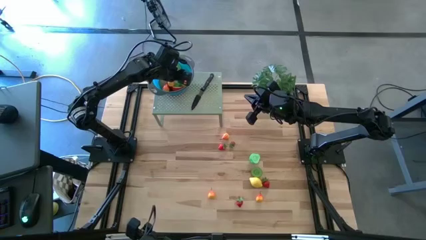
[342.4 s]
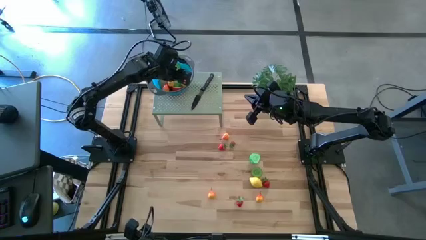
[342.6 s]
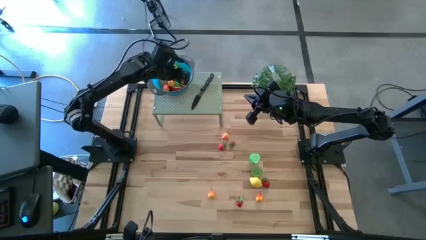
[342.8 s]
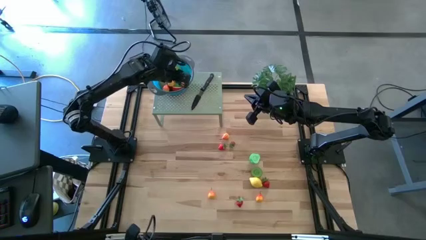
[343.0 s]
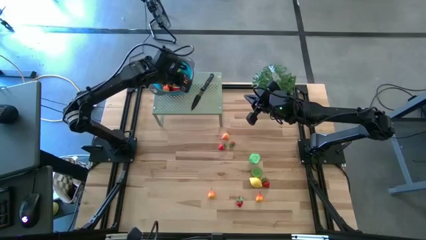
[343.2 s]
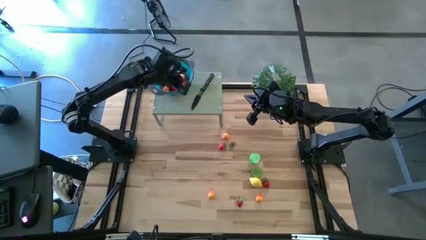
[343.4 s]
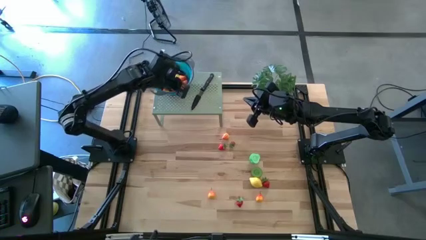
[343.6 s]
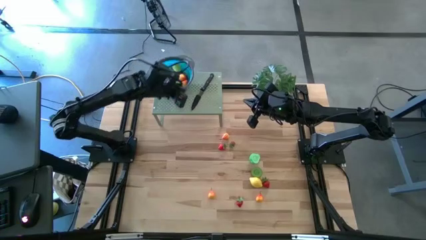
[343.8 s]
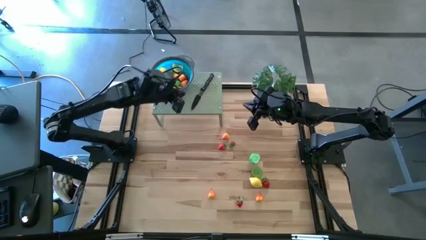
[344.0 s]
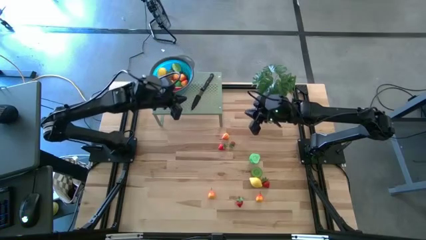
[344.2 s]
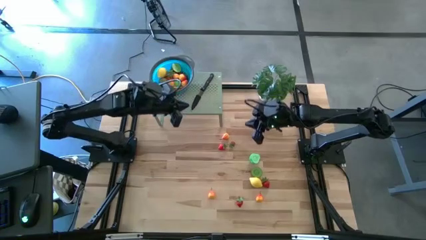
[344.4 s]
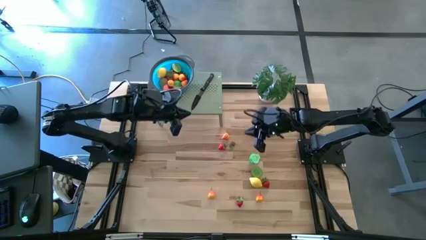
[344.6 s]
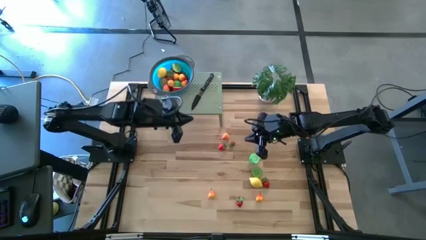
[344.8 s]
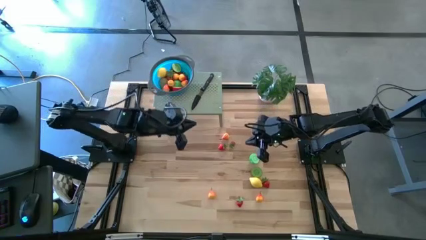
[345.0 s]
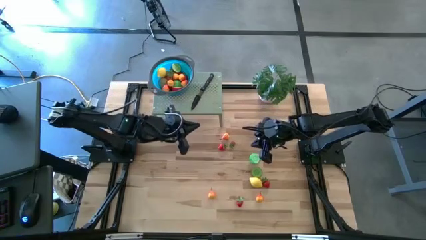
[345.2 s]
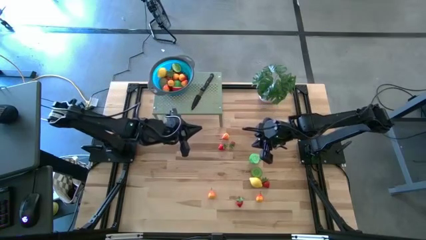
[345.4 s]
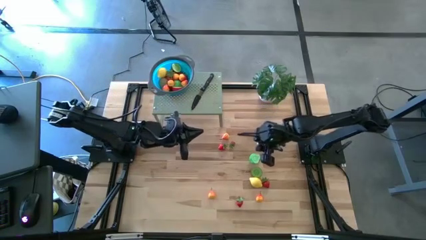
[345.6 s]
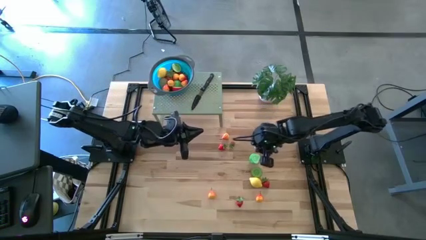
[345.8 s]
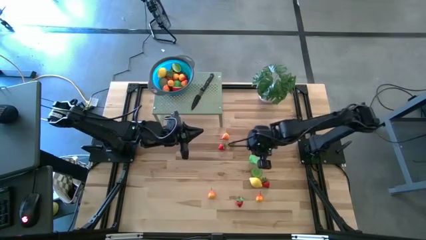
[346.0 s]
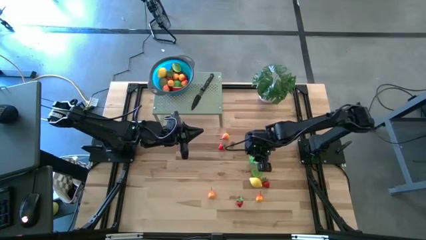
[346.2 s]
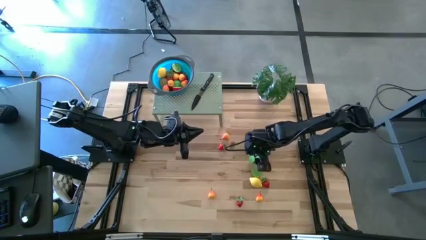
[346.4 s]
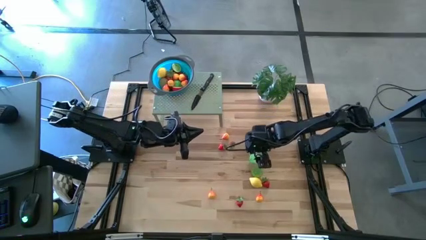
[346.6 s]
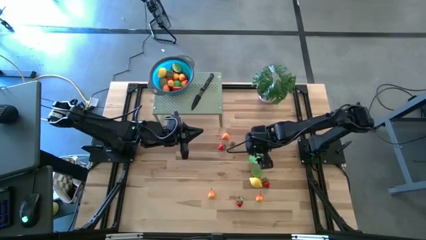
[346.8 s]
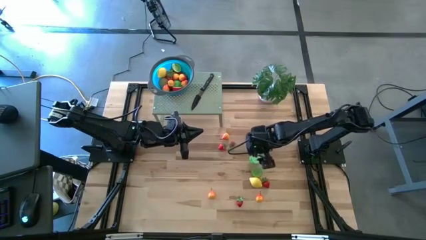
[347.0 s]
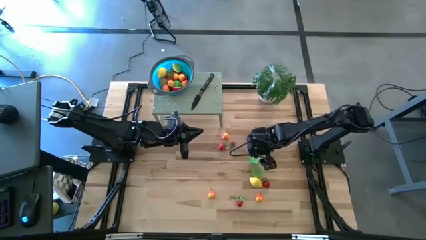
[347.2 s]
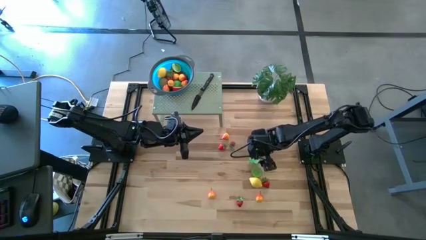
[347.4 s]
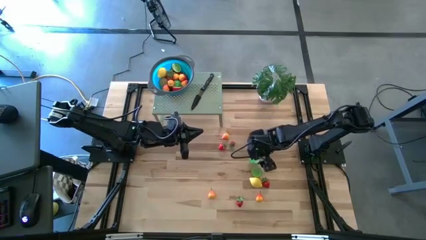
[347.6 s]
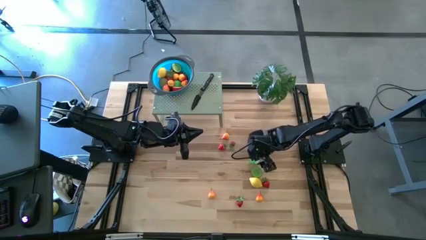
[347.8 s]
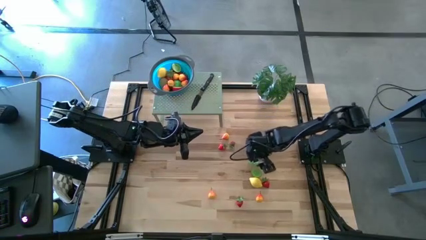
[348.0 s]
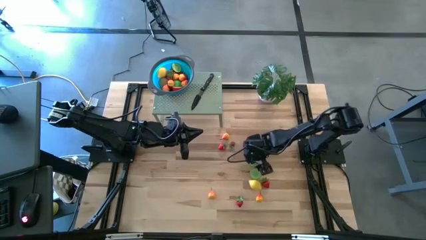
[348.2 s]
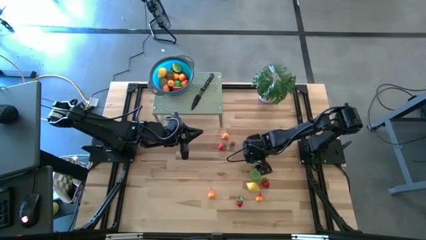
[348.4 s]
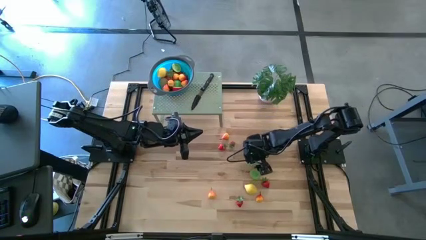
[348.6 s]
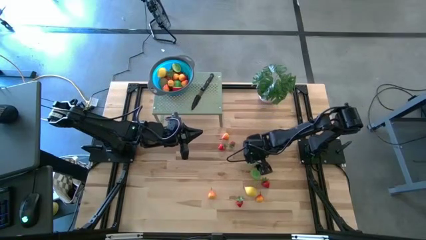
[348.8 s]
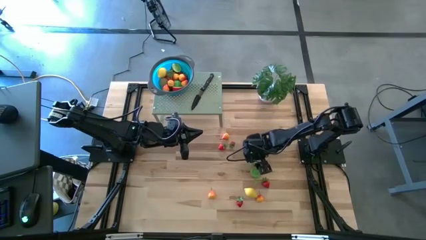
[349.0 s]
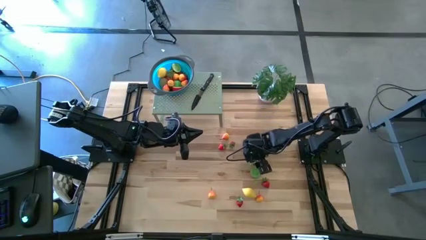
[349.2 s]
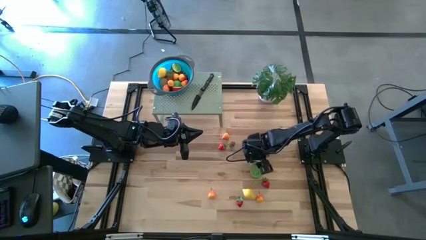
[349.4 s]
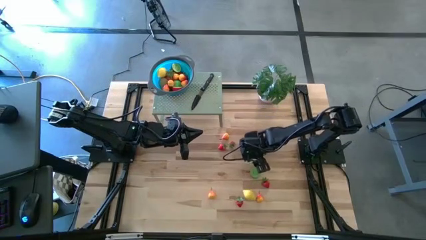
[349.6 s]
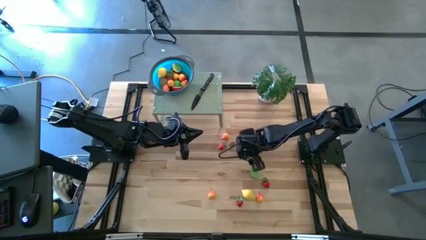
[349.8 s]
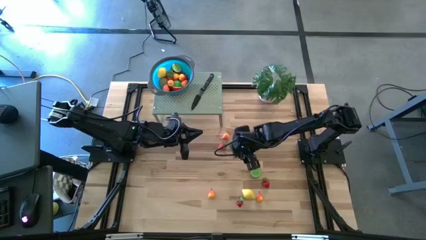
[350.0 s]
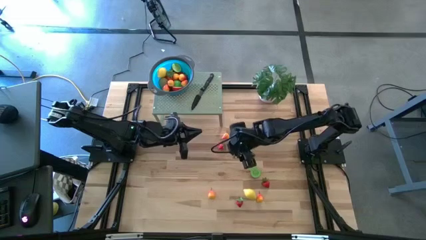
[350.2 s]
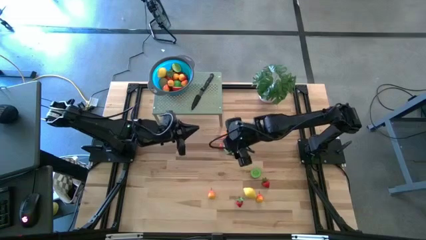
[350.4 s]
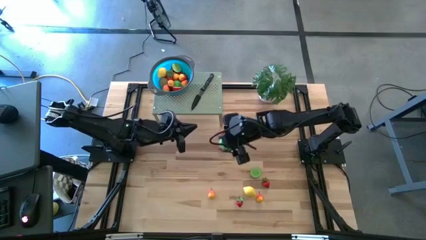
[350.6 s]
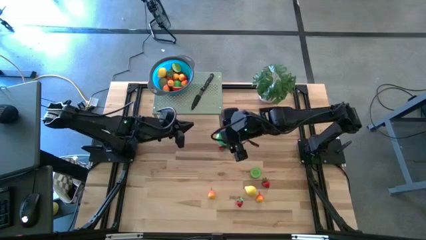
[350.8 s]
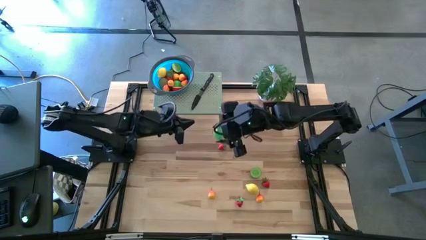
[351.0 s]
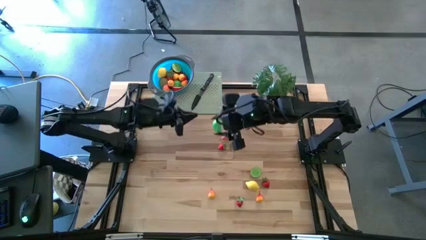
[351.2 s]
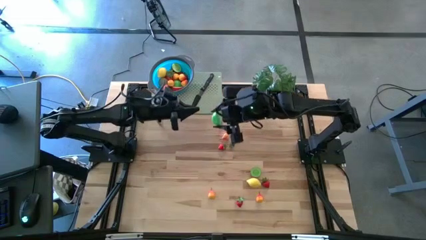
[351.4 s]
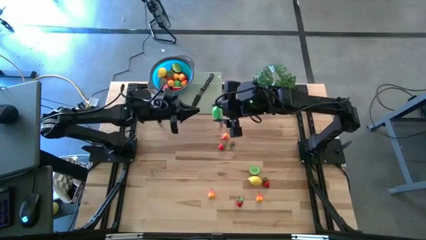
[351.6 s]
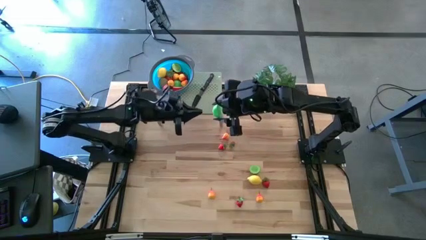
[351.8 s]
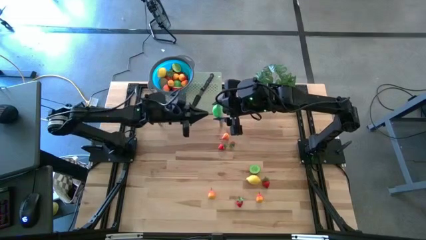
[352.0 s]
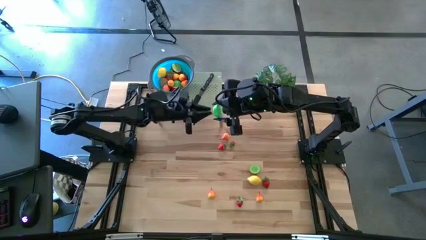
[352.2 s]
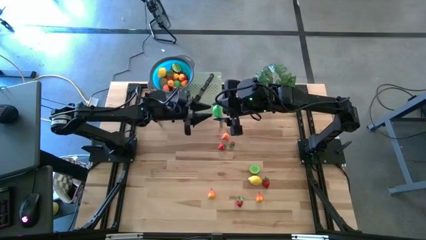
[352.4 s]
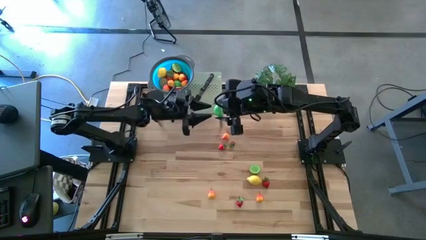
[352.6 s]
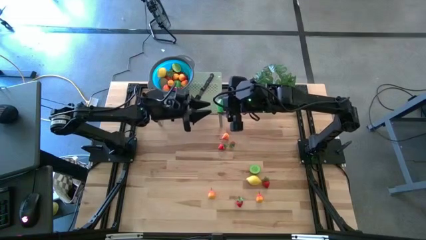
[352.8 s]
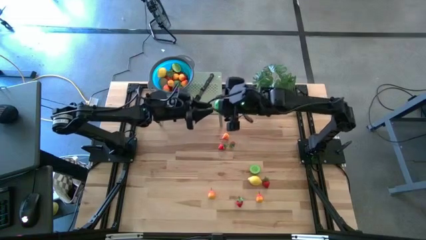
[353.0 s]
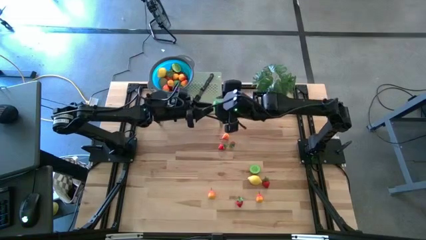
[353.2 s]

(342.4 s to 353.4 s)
Task: Pick & Place Fruit
Put the half green pear into the strainer bowl on the shelf

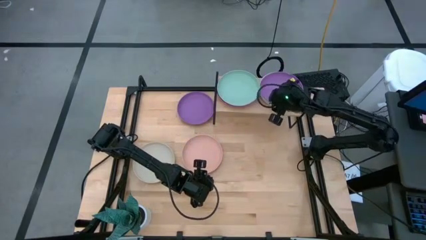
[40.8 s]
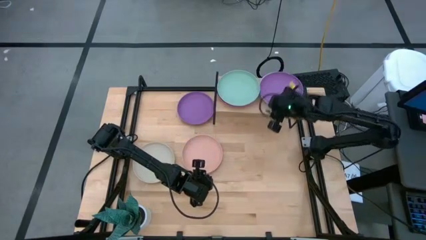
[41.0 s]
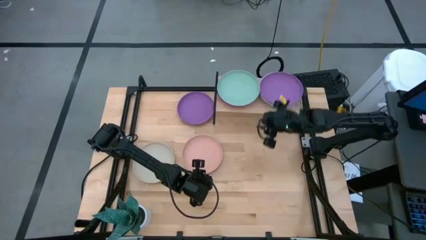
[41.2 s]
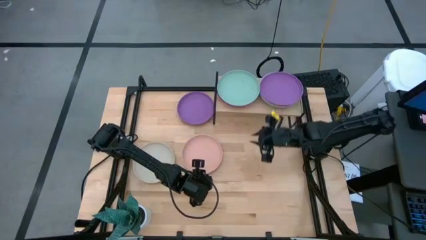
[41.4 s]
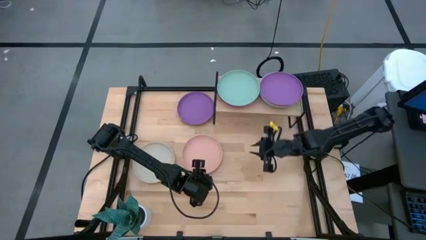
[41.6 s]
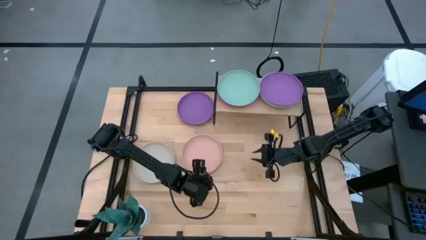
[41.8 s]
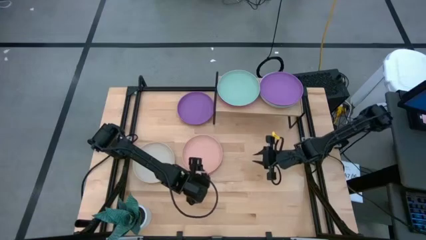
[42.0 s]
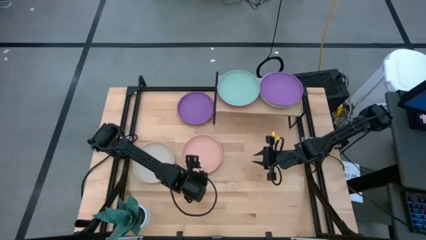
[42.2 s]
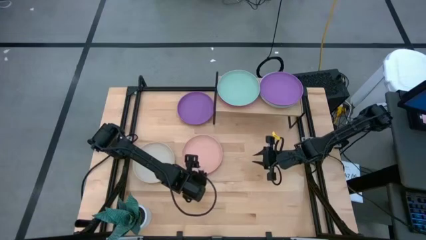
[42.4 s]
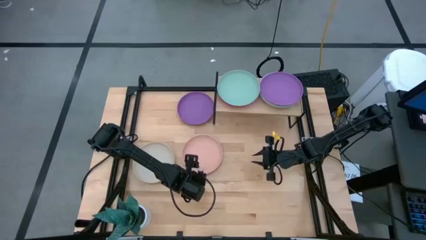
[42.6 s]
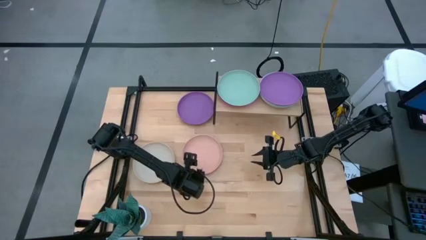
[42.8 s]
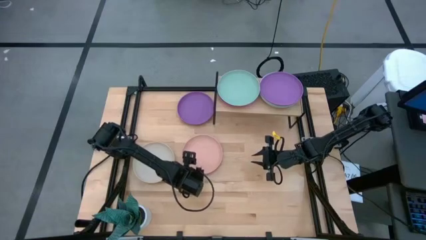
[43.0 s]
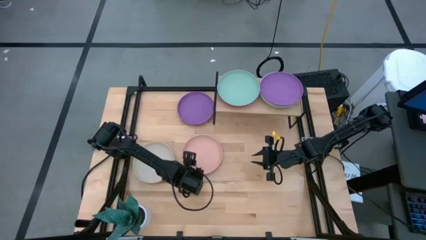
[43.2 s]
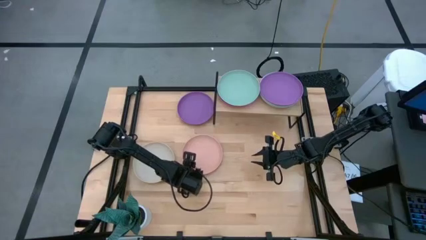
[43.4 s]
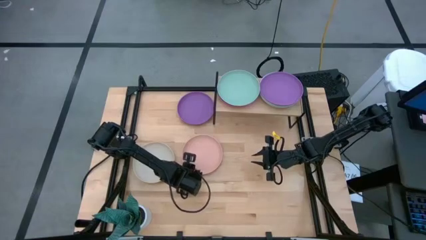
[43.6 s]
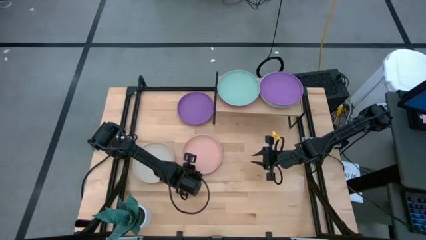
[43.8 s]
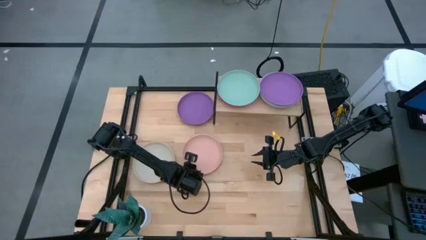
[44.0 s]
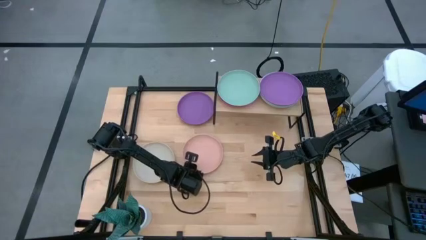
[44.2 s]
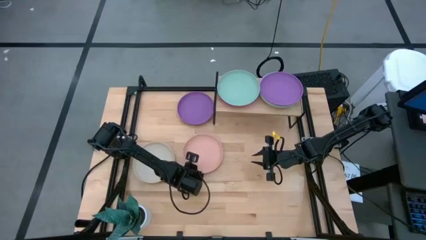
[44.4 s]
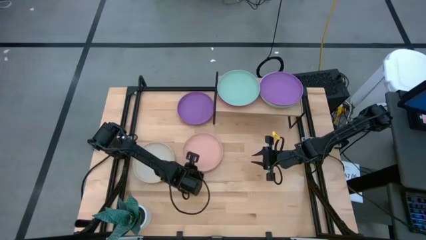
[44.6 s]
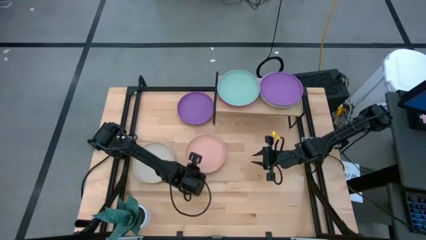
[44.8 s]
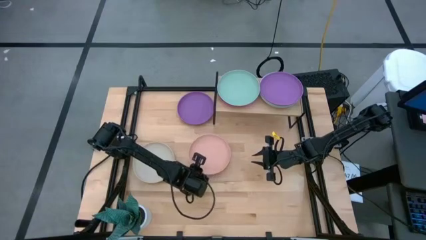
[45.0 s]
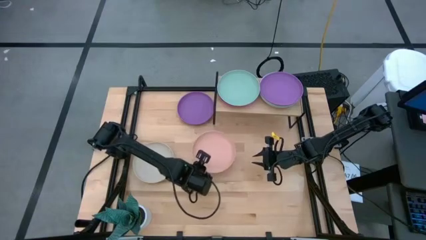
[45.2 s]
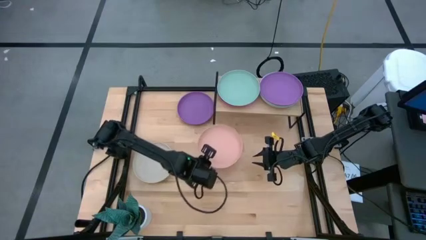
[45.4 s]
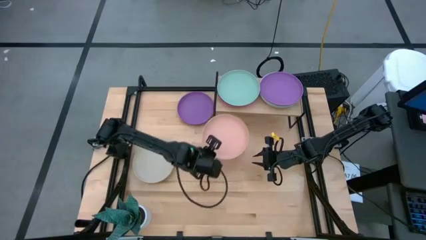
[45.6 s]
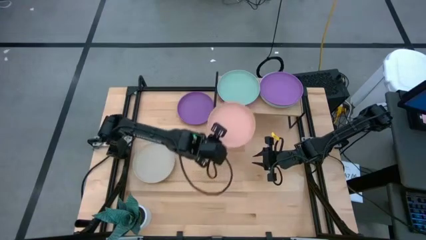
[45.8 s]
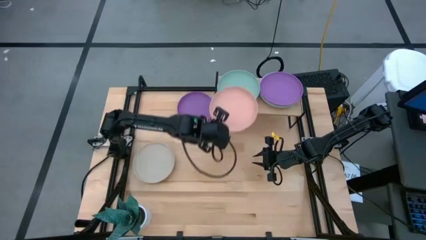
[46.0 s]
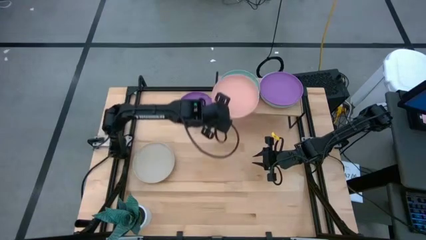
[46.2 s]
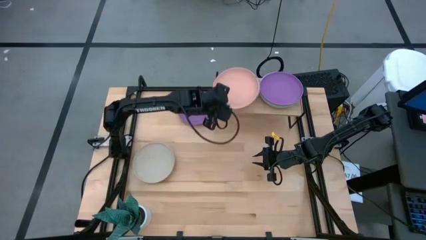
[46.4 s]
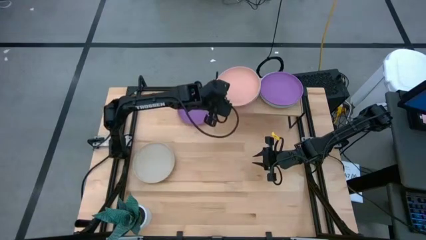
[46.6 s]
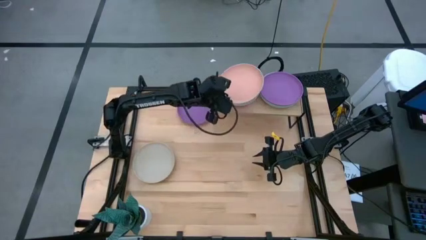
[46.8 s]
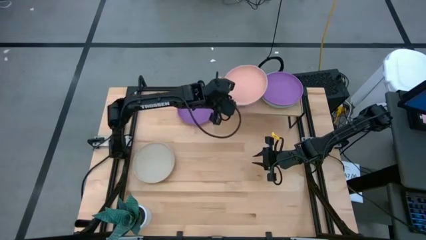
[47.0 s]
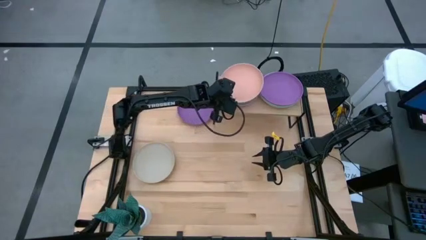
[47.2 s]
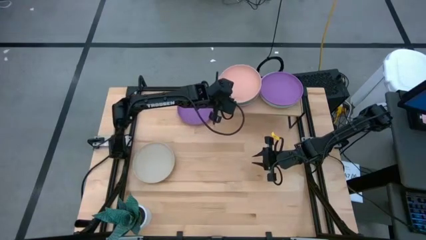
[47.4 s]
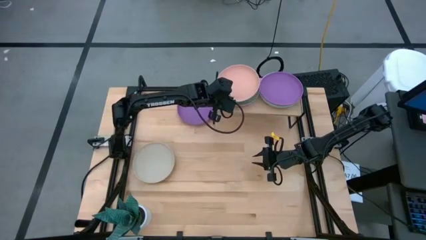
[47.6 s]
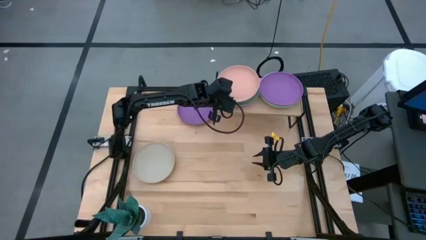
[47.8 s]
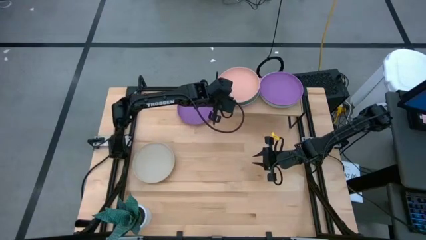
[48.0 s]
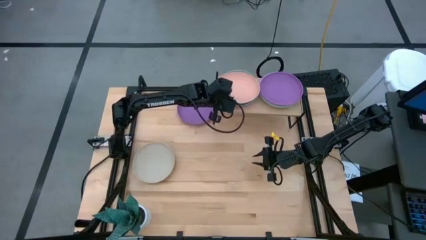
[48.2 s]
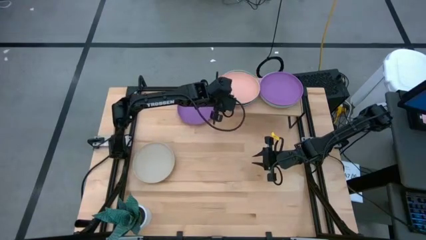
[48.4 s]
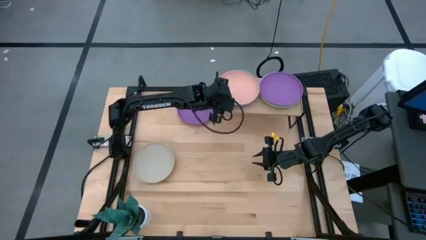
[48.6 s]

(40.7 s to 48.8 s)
Task: Place and stack plates onto a shelf
Stack the light orange plate on top of the green plate on the shelf
